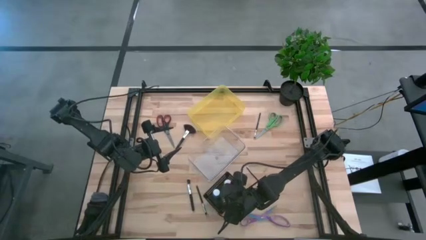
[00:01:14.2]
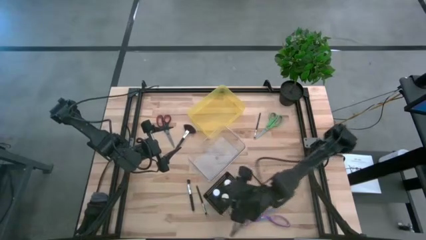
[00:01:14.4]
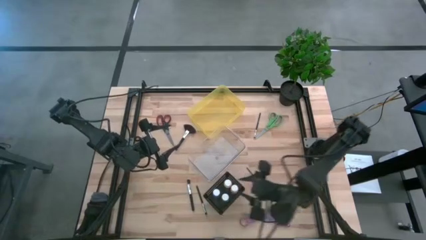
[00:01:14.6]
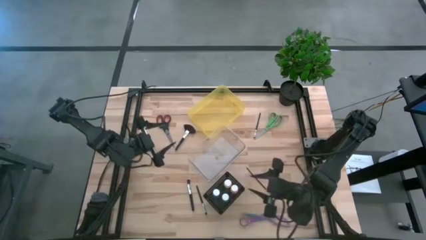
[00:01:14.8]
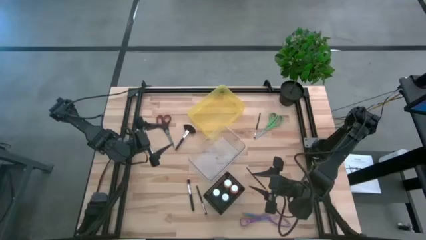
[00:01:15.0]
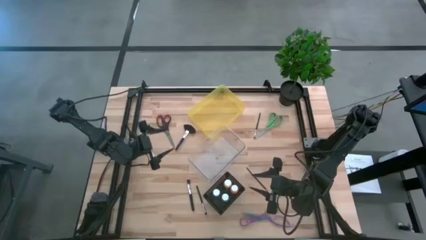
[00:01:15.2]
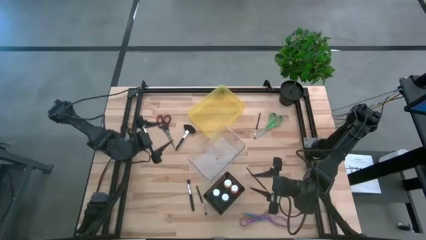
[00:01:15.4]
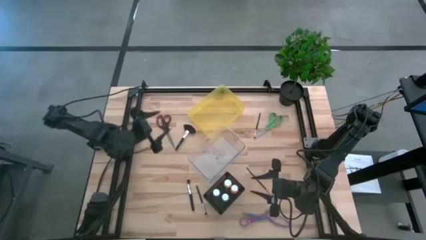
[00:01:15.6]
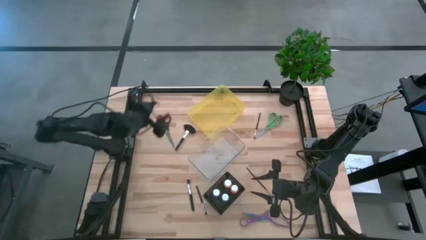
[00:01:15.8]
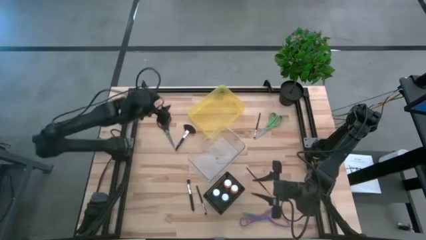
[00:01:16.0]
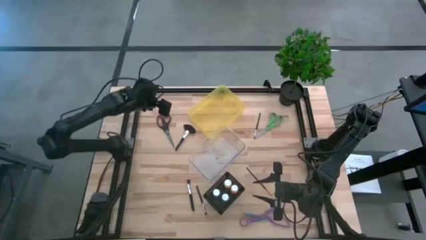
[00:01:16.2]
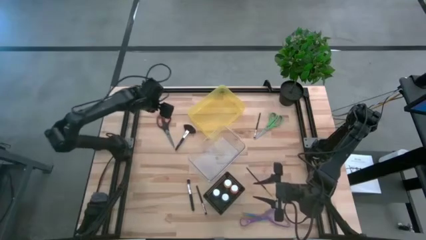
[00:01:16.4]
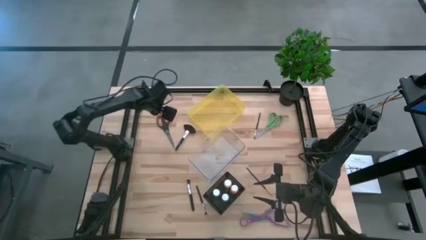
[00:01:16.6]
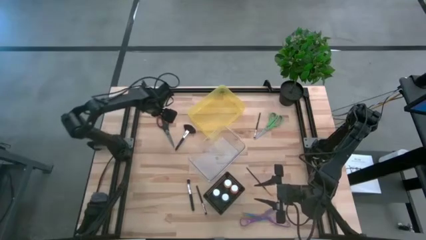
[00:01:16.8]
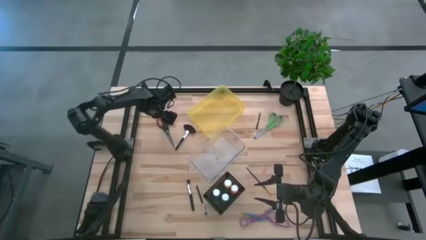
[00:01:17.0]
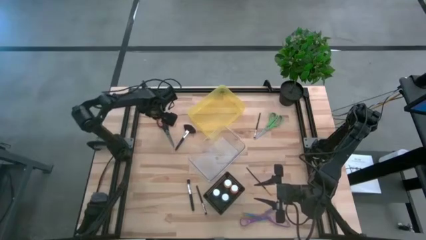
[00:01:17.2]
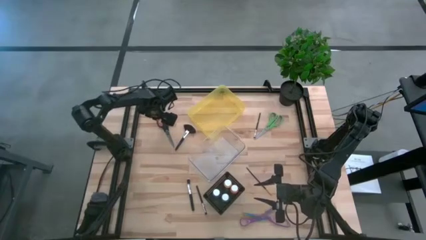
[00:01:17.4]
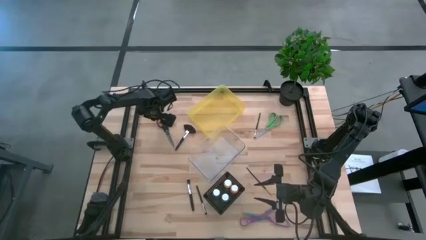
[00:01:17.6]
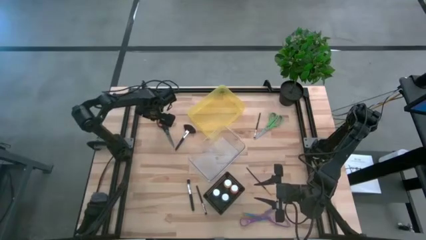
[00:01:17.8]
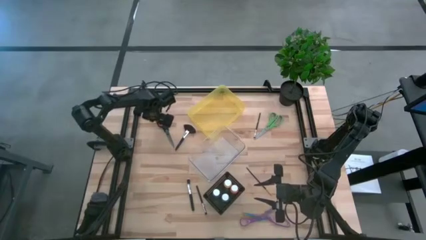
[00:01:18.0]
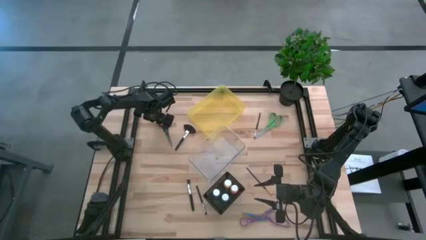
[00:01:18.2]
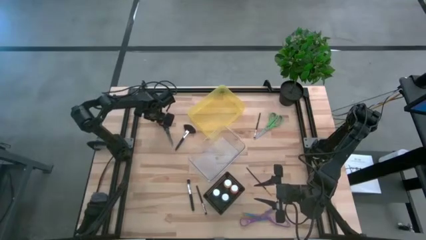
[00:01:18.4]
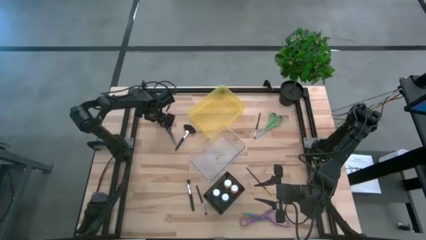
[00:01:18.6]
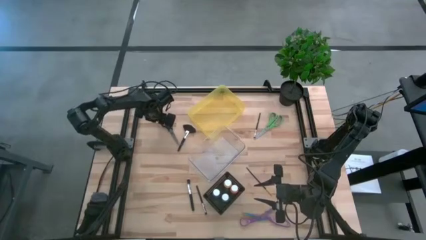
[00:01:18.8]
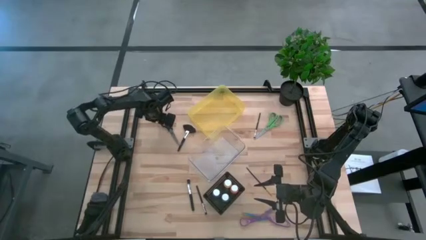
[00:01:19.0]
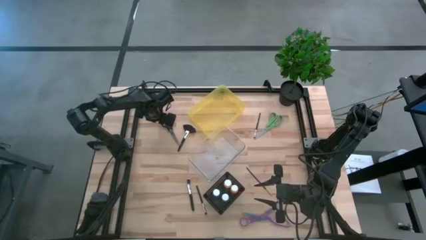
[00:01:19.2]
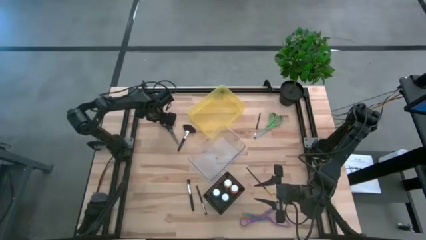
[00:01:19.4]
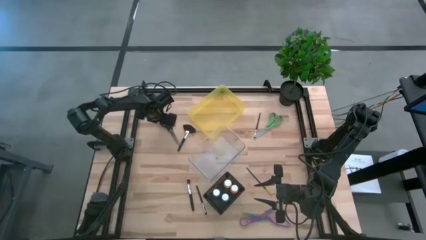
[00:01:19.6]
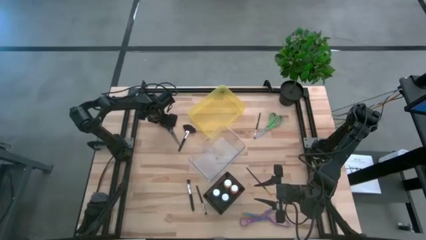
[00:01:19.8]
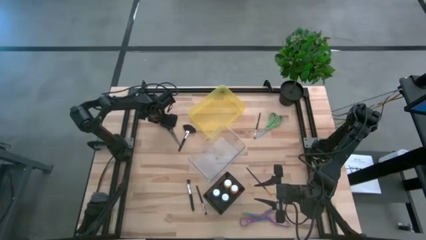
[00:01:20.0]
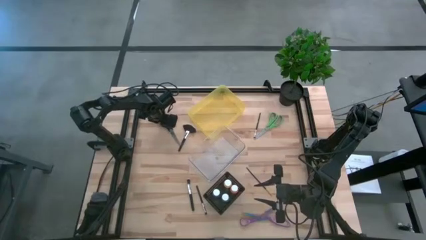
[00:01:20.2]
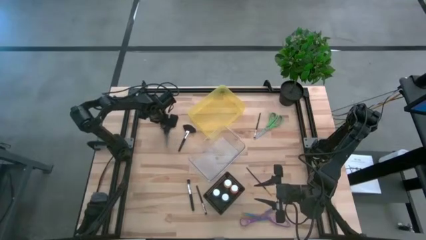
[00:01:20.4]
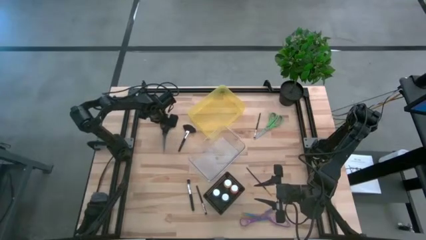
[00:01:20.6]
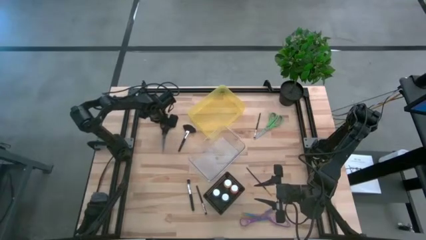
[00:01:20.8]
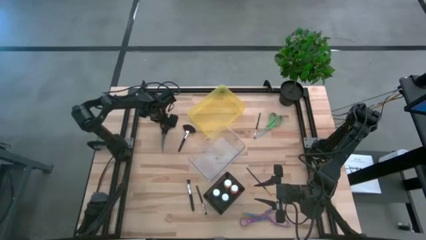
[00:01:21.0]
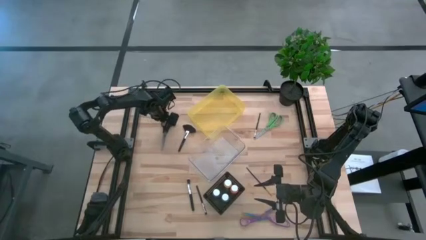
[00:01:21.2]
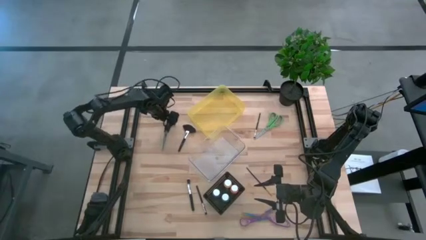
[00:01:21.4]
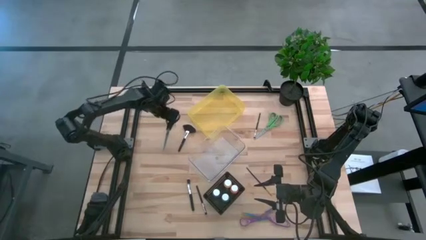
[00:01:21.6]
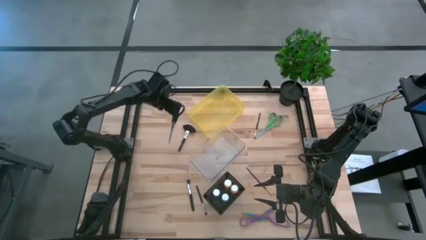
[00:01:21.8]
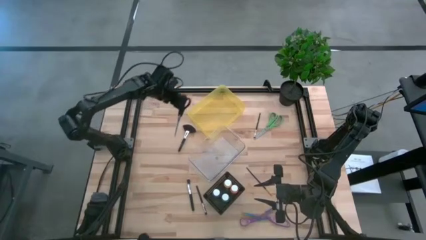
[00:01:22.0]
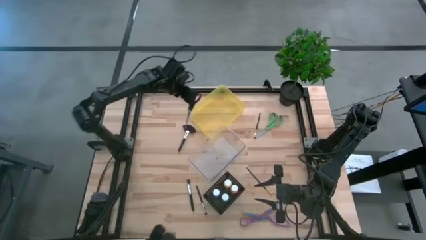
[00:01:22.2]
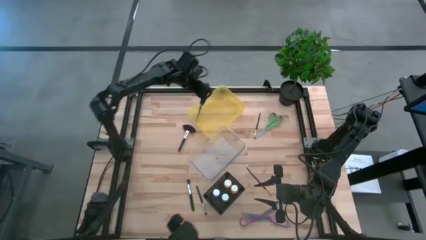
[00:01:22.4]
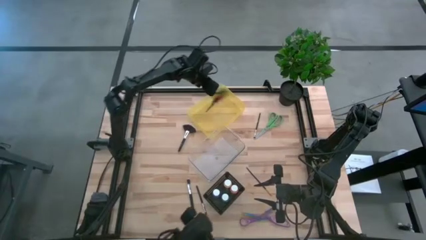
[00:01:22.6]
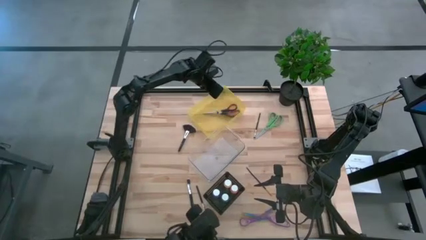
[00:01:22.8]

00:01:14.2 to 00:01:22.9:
Task: Pick & Place Paint Supplies
Put the black scissors into the yellow transparent bin

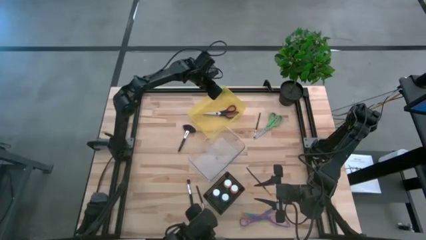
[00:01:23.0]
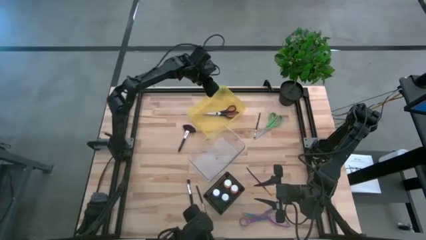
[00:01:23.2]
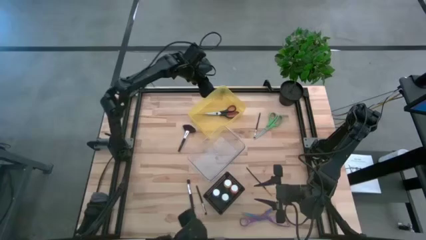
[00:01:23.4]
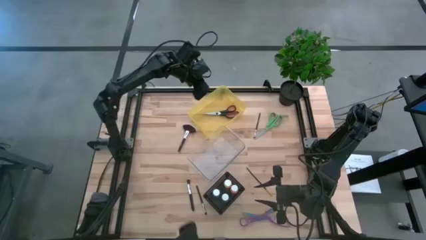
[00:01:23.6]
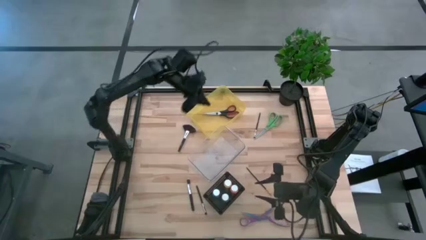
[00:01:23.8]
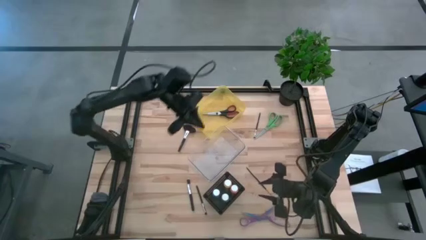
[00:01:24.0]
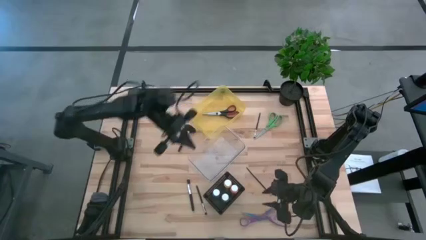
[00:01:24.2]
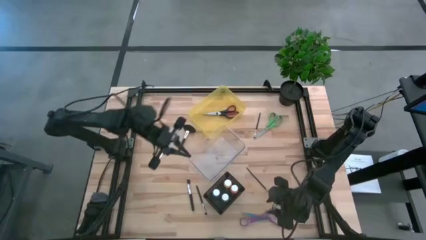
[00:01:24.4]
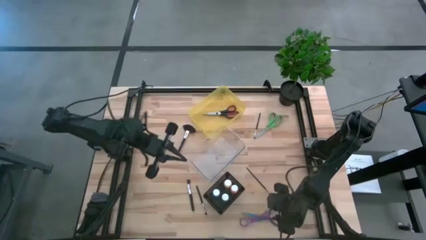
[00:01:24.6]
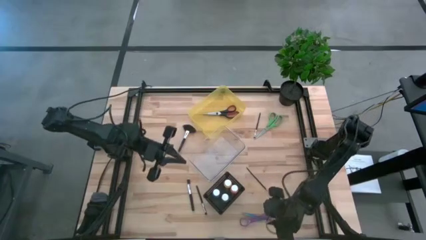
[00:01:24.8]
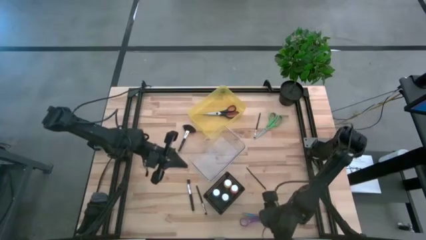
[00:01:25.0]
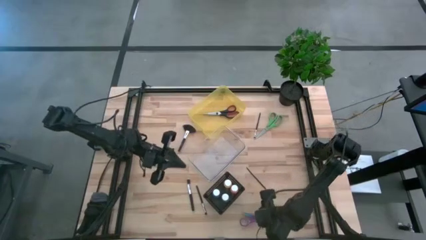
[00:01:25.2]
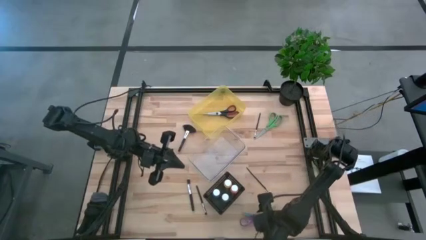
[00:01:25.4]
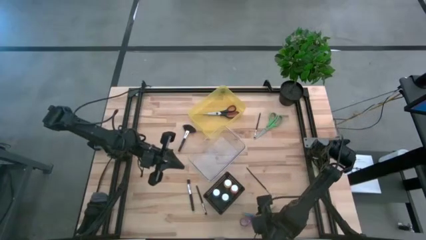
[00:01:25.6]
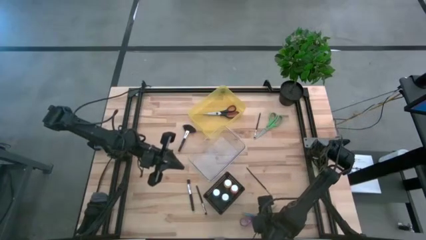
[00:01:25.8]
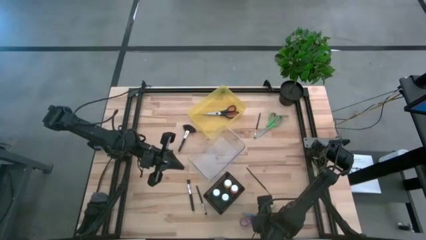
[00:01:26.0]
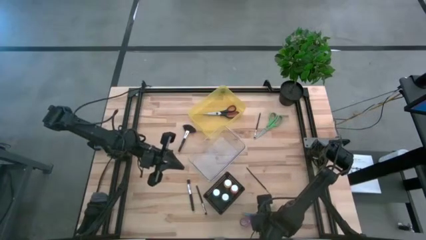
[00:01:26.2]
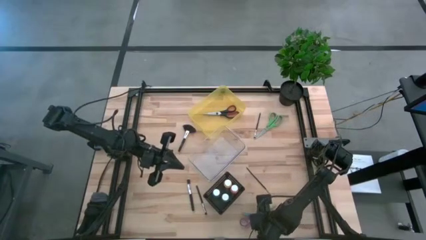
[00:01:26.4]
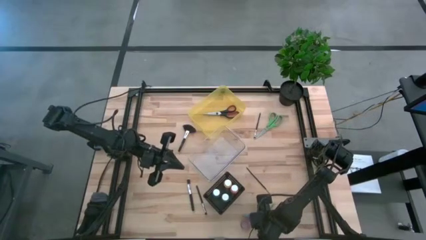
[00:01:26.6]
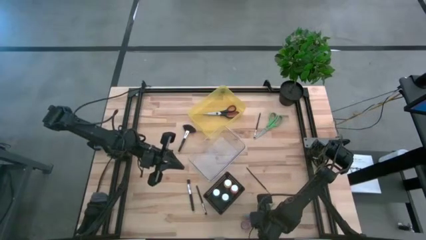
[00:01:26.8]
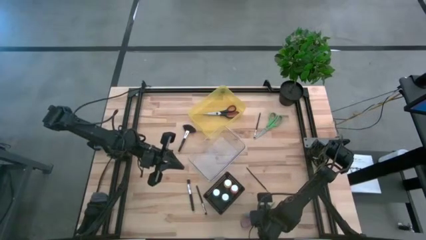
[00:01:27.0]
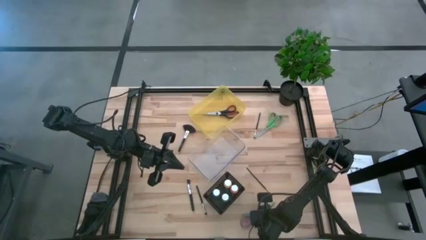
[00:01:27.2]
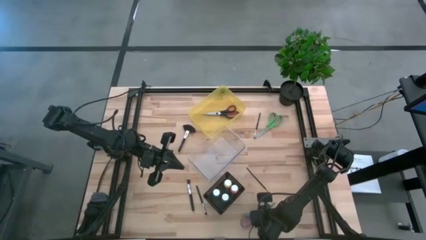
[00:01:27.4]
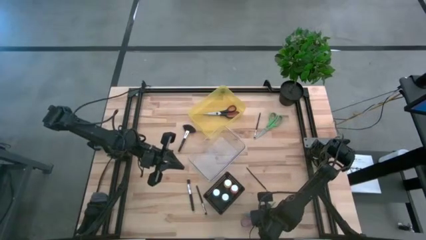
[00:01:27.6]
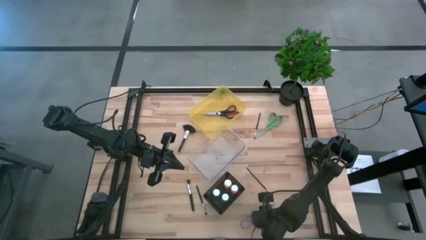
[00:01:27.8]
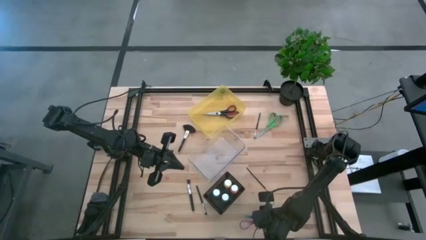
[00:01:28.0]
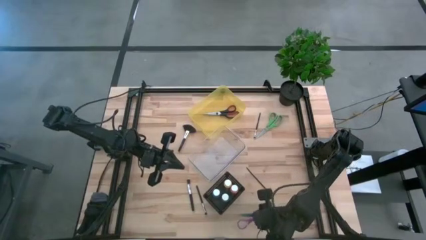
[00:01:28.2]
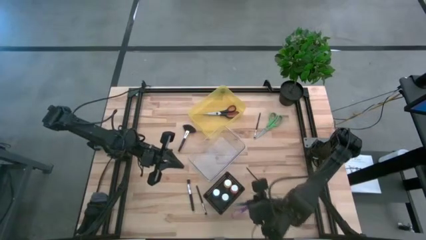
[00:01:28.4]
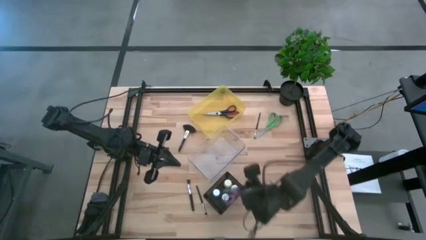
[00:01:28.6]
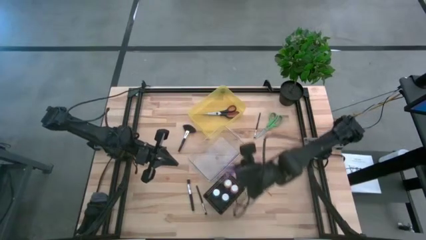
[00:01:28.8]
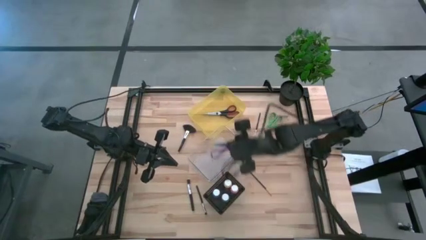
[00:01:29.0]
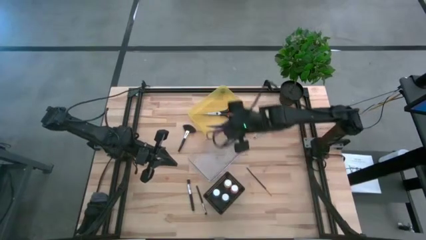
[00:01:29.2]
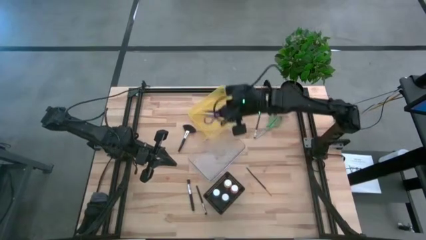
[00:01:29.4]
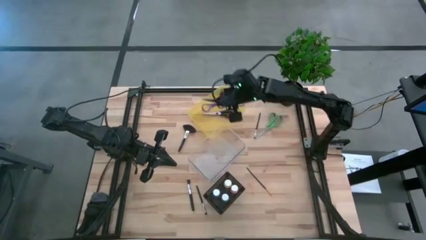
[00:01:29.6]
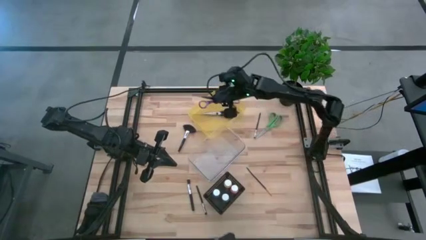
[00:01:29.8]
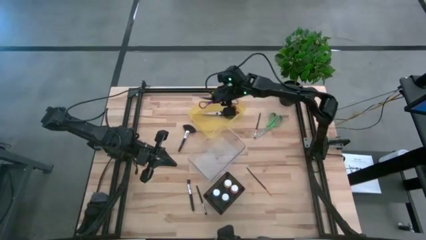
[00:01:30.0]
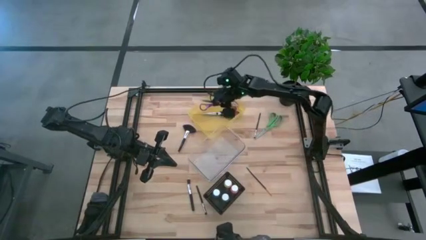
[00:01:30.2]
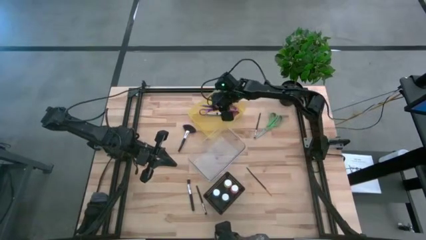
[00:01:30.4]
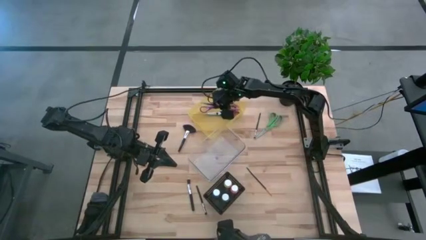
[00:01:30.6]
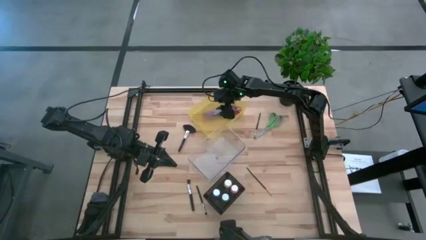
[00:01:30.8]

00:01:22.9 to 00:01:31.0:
Put the pink scissors into the yellow transparent bin
